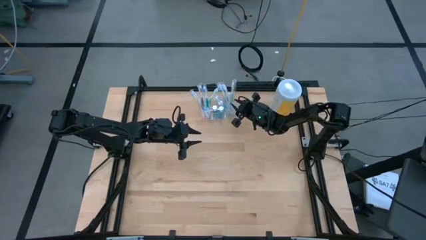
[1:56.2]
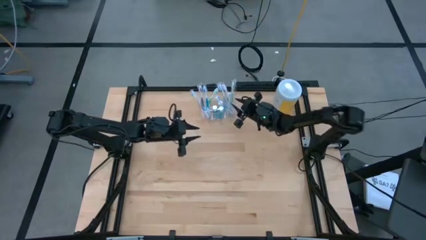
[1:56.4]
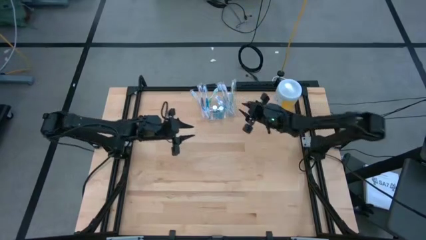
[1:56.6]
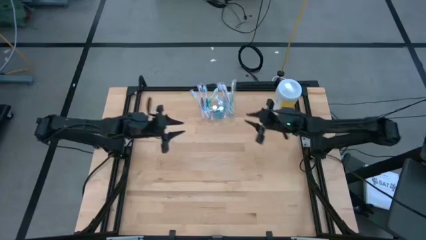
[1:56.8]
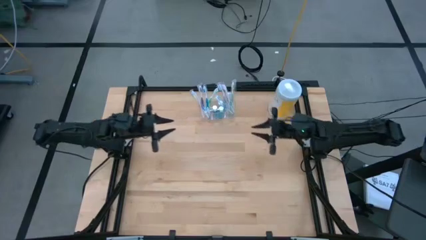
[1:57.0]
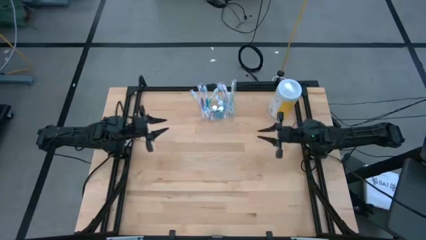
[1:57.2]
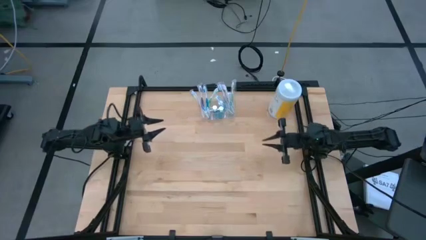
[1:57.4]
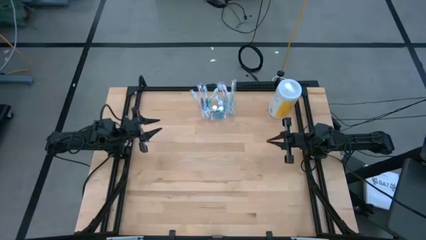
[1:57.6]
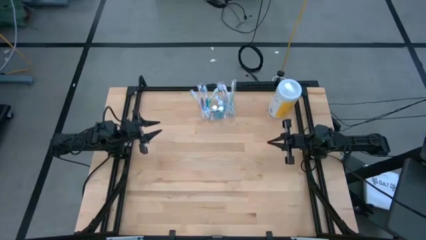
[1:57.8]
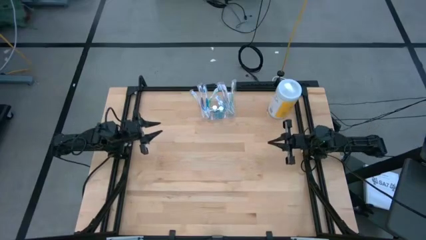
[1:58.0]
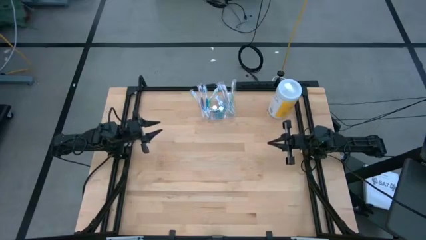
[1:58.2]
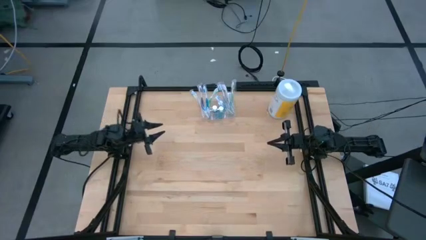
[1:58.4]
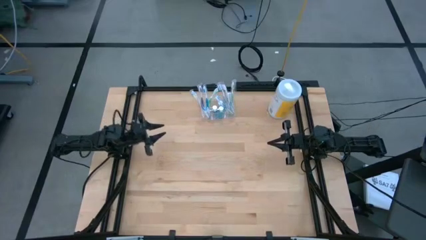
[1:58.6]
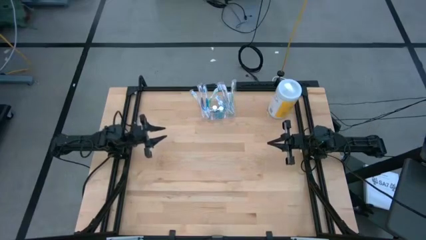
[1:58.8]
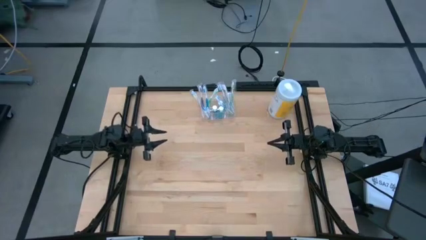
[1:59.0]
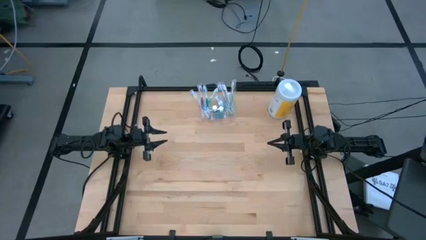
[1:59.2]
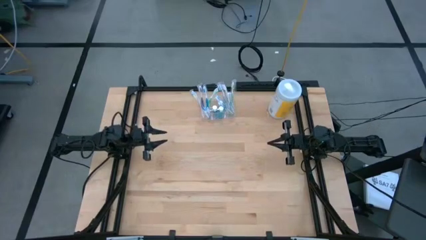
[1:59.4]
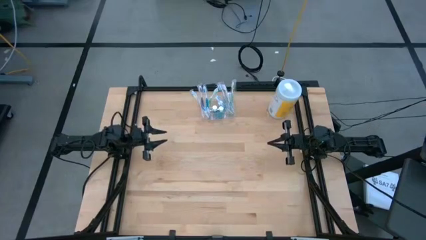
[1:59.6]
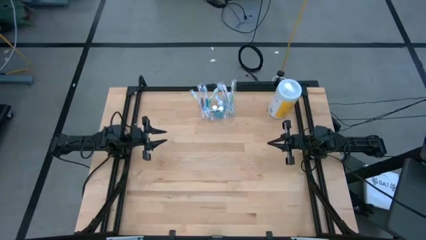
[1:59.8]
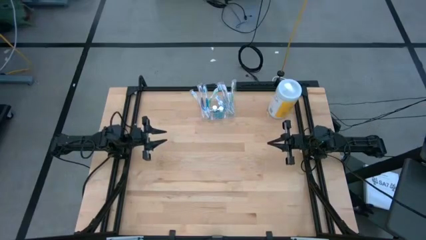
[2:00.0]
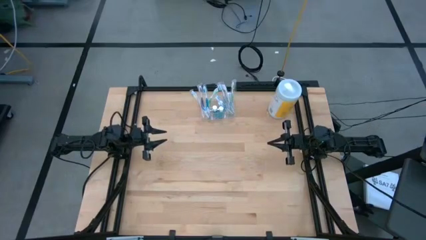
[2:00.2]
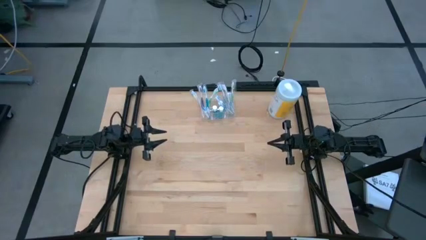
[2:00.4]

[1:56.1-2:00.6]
Task: Pick & Place toothbrushing station
Return to Home Position

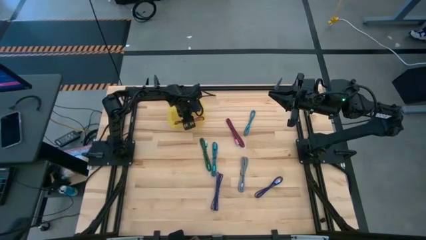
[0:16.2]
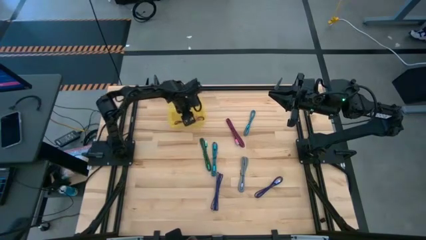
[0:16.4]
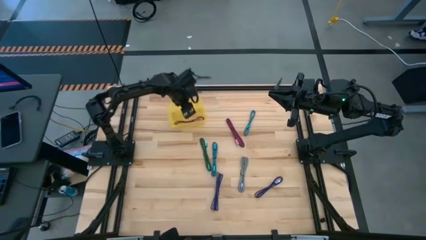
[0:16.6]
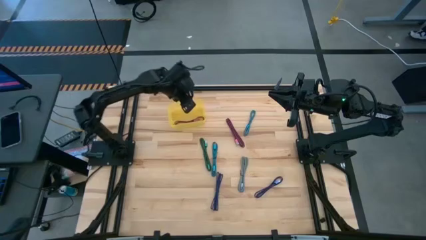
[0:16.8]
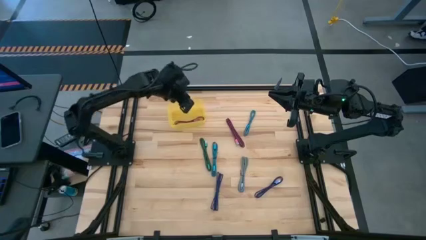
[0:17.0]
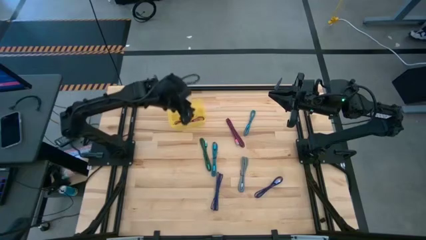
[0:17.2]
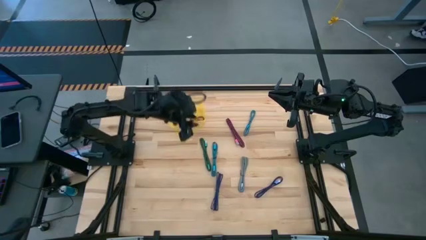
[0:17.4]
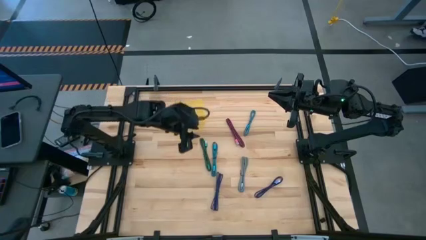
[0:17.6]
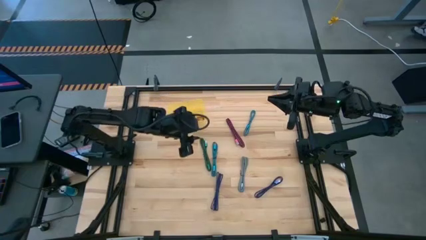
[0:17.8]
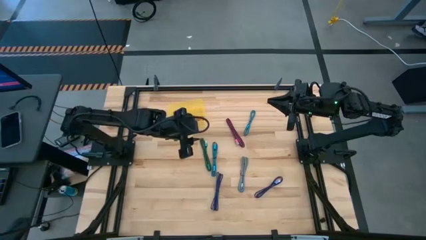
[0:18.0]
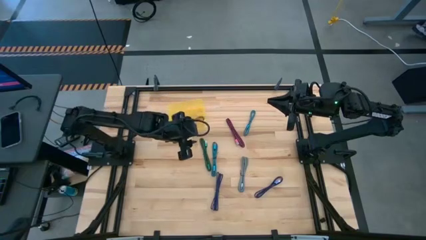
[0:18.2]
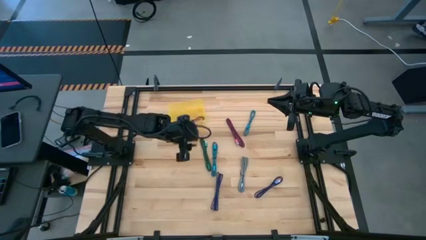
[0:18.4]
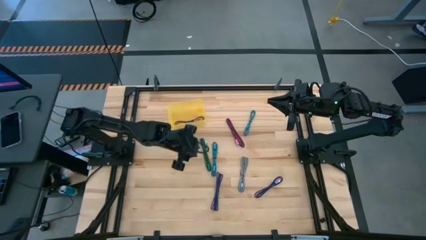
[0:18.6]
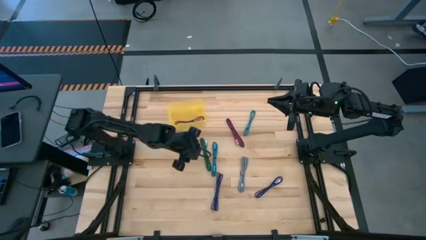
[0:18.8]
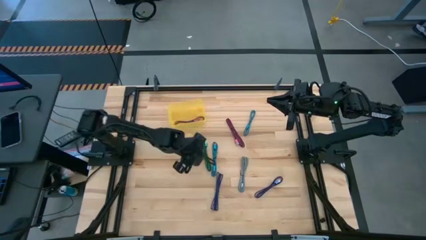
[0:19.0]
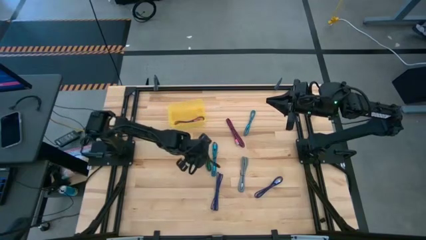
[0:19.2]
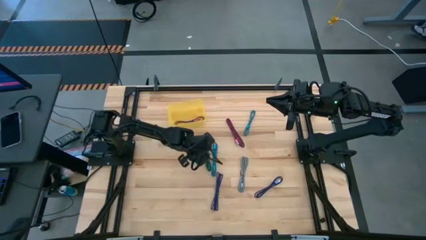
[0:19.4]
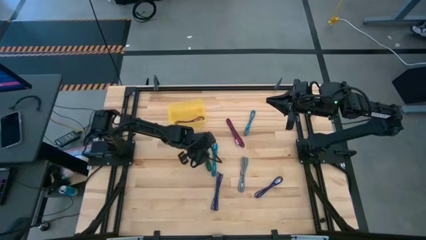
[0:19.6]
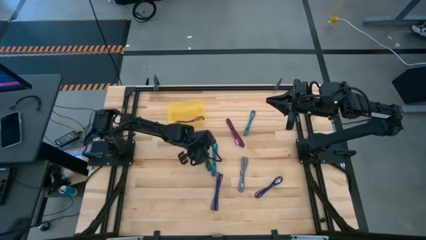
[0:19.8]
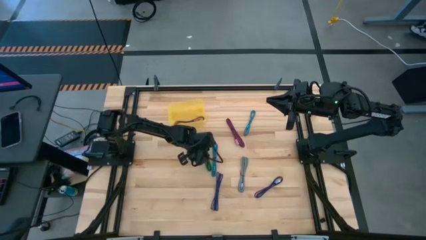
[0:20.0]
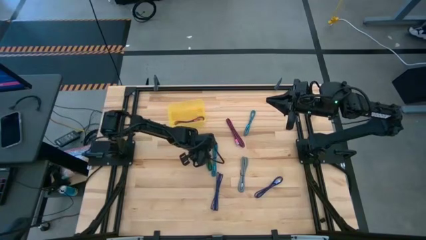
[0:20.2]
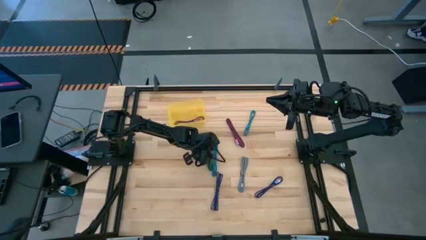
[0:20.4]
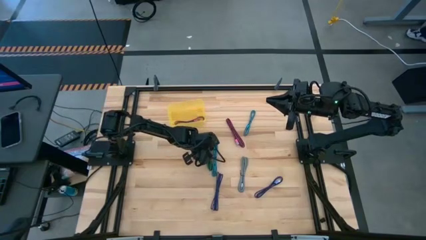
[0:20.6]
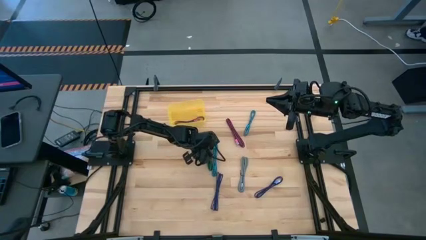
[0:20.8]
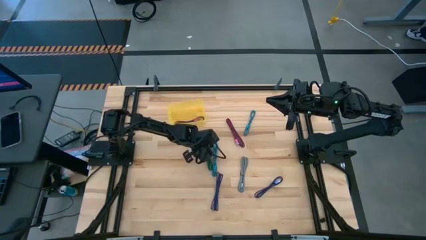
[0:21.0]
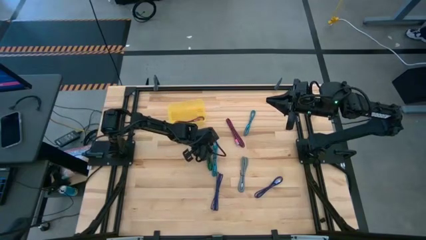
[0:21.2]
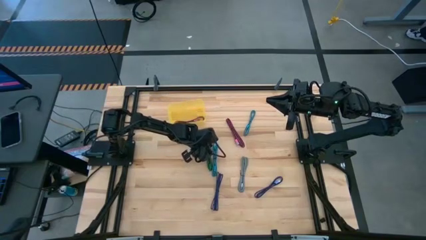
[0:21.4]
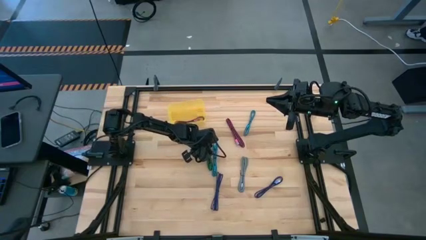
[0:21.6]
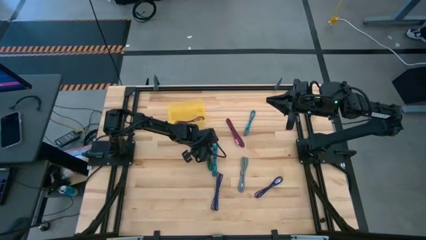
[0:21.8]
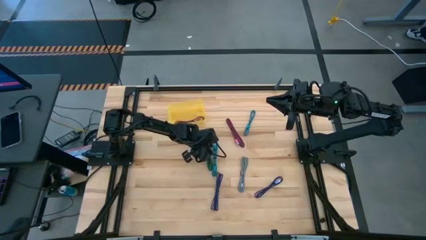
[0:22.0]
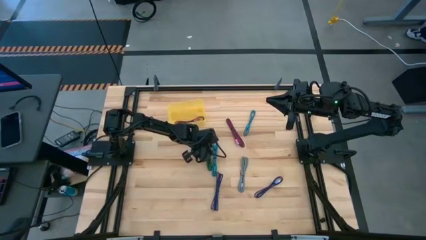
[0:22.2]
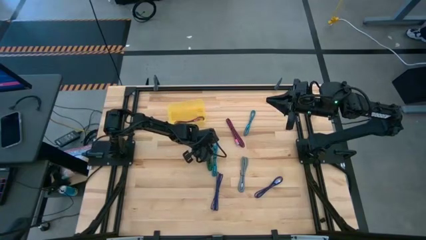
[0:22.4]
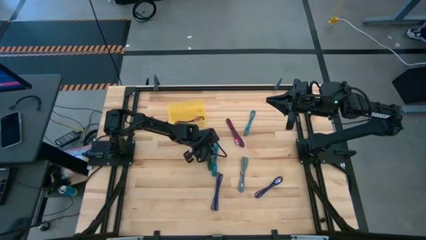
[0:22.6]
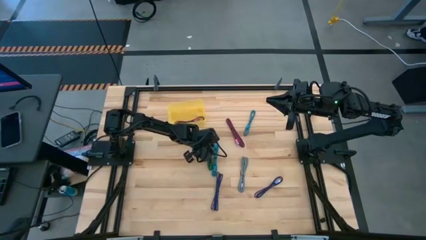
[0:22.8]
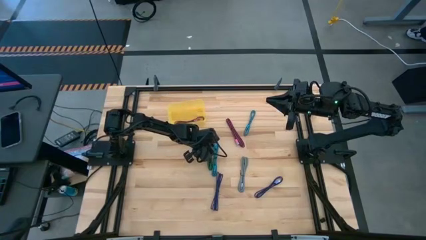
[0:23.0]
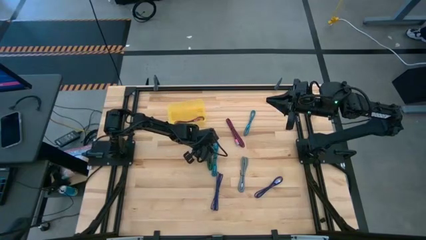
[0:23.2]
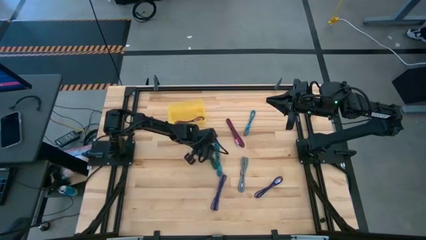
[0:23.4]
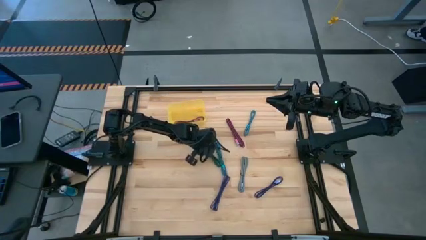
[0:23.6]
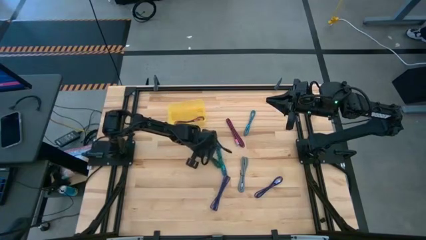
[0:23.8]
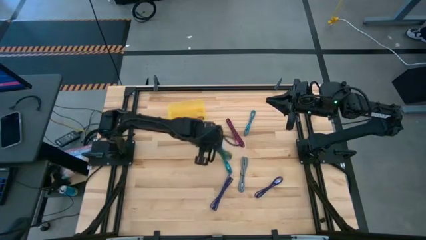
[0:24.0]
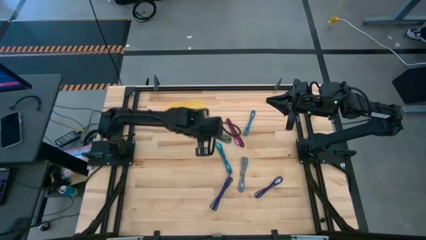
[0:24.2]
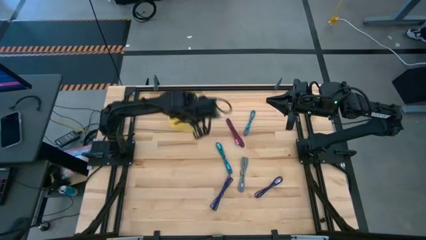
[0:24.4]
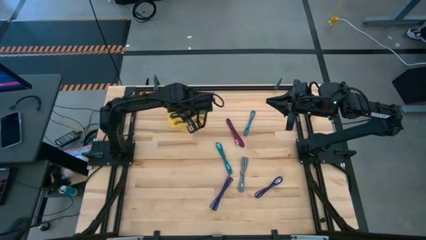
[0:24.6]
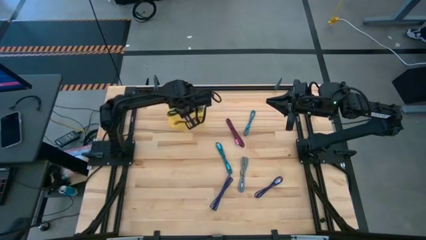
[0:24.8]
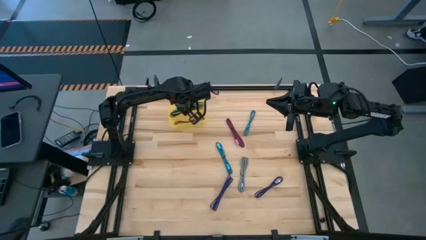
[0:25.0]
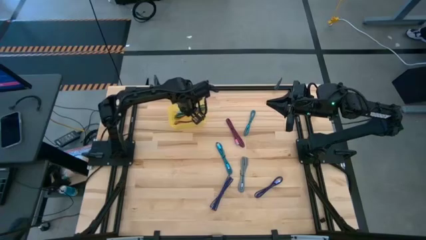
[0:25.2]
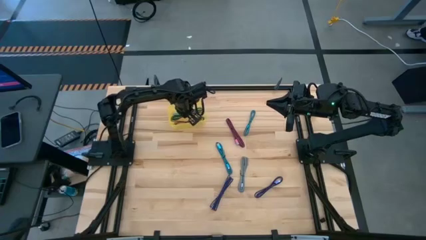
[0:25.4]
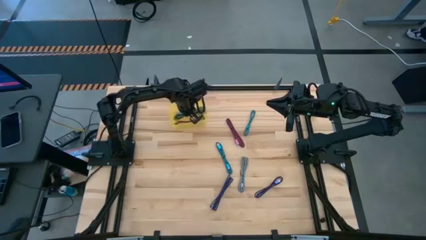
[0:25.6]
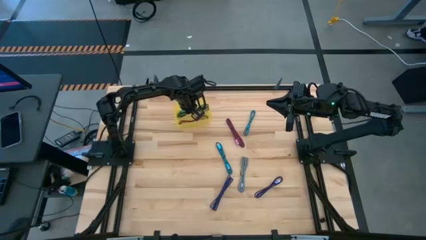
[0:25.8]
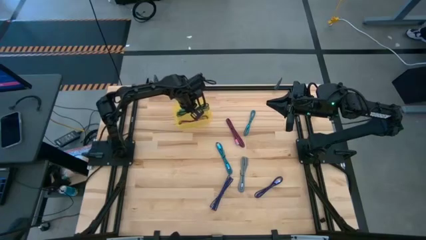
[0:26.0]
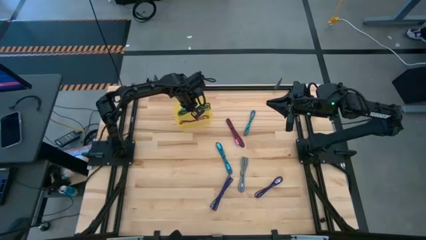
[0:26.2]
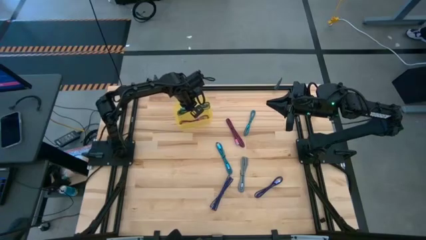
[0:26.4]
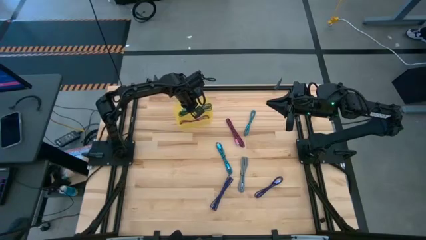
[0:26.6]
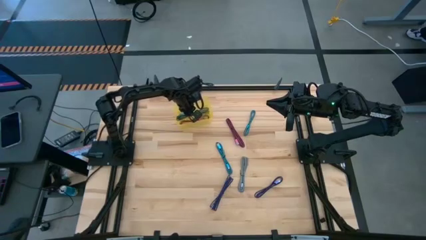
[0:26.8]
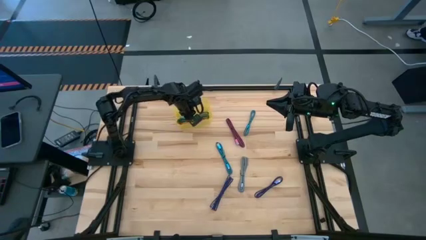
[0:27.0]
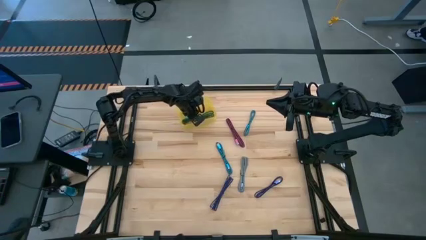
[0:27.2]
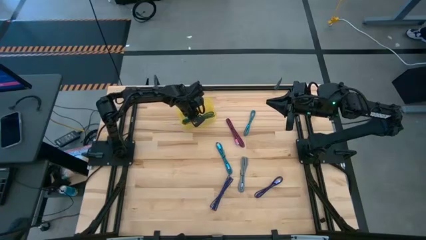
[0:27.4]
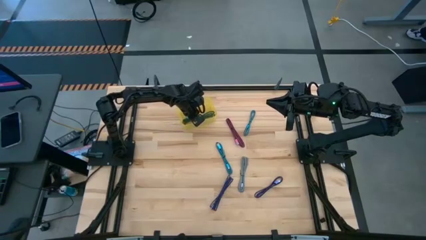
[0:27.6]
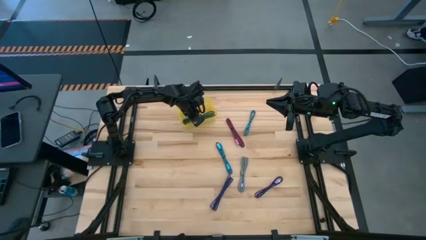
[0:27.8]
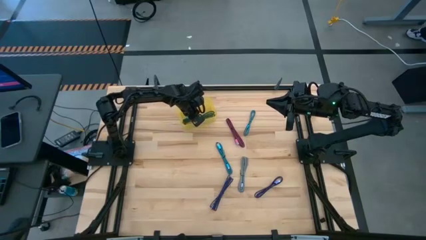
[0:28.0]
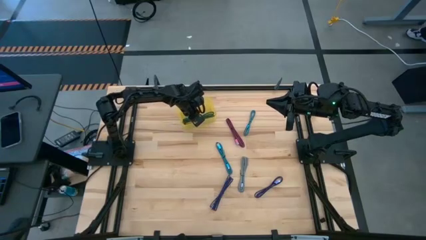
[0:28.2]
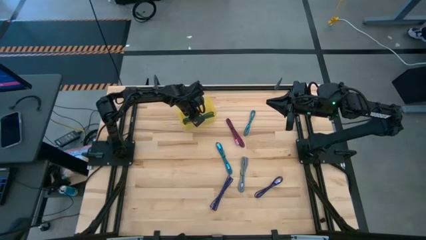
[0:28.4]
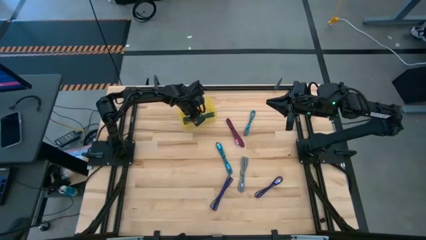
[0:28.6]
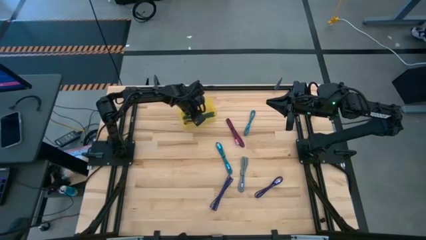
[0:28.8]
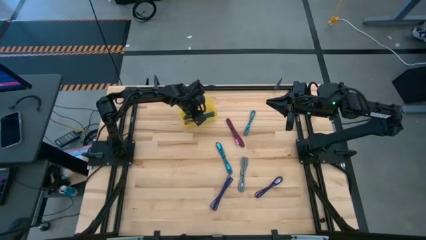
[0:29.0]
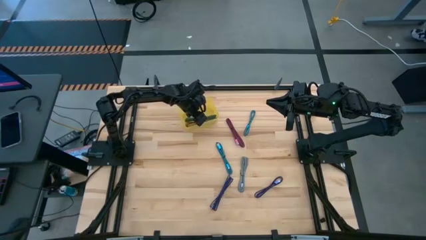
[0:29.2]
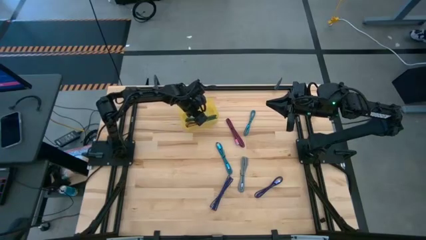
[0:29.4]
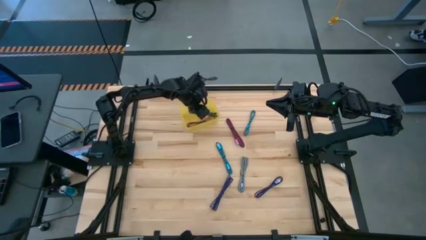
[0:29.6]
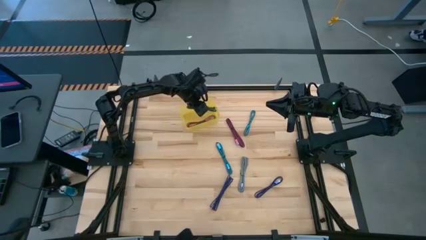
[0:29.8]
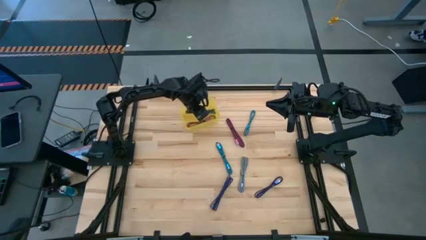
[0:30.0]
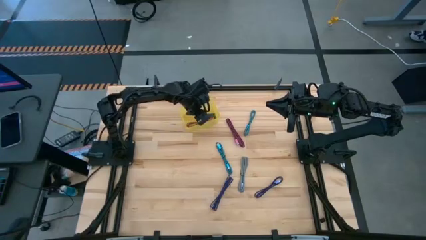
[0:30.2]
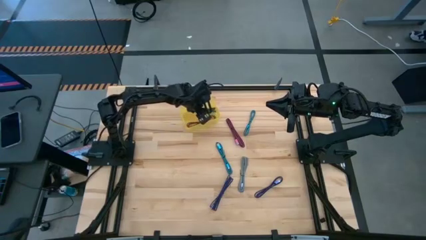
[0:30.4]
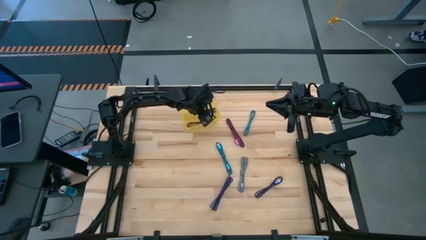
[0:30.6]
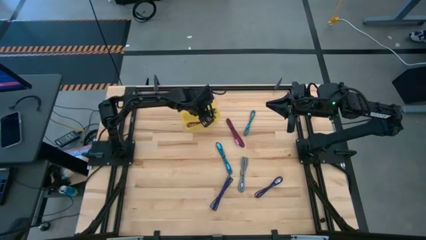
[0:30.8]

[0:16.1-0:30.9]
Task: Pick and place USB-C Cables
Put the green charger cable into the bin
